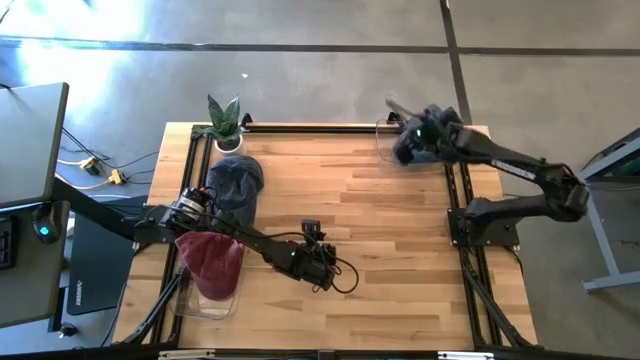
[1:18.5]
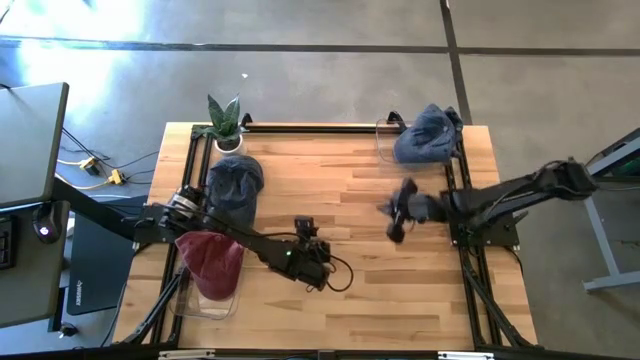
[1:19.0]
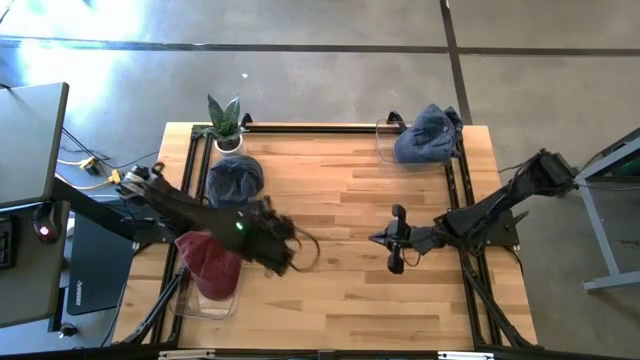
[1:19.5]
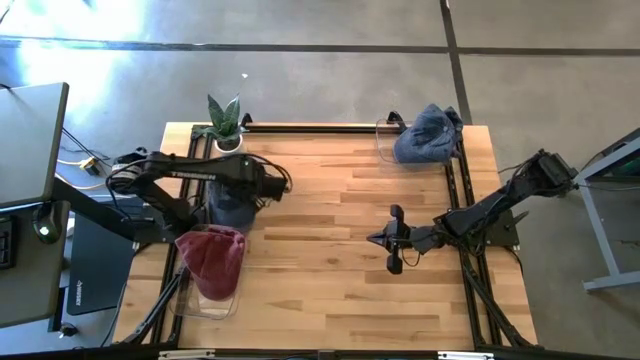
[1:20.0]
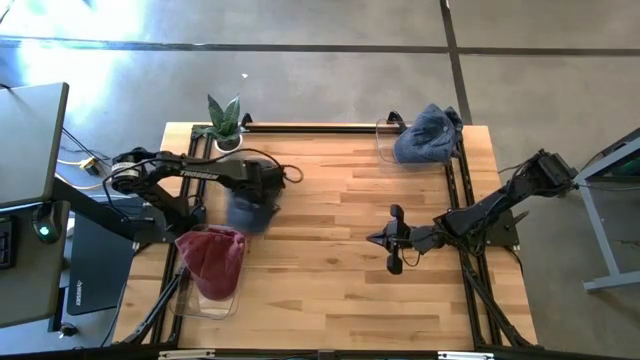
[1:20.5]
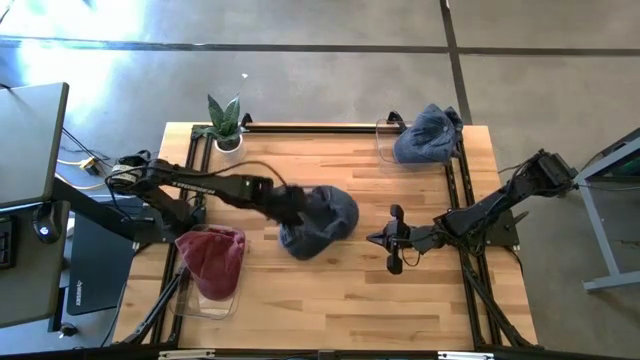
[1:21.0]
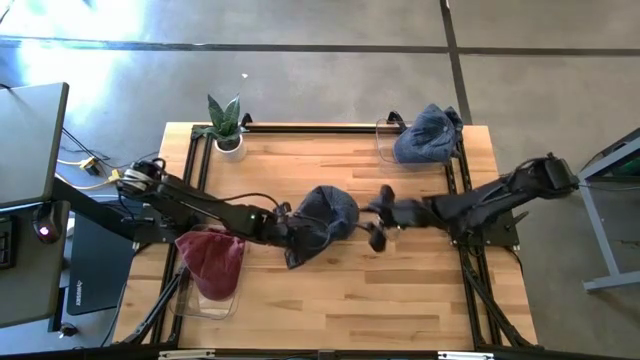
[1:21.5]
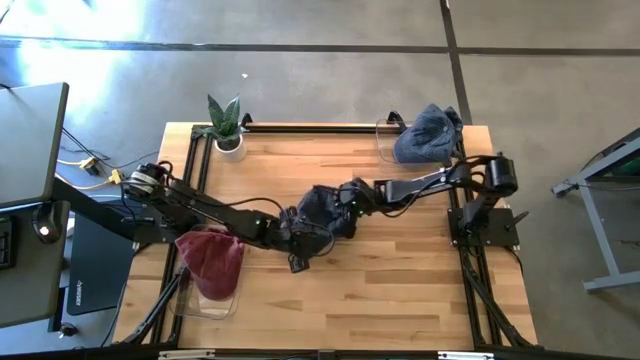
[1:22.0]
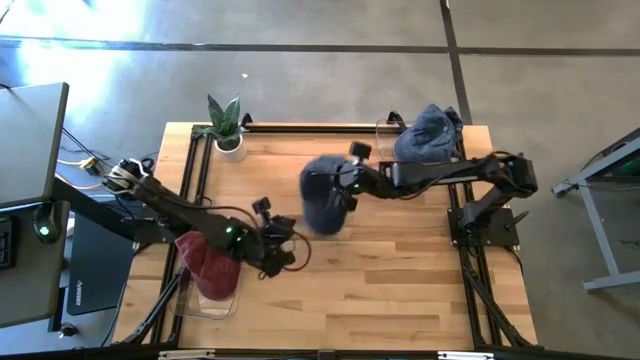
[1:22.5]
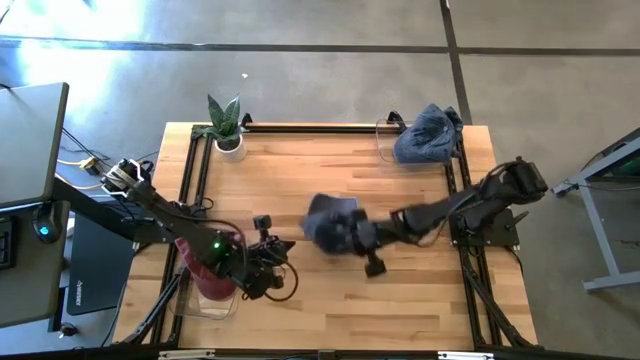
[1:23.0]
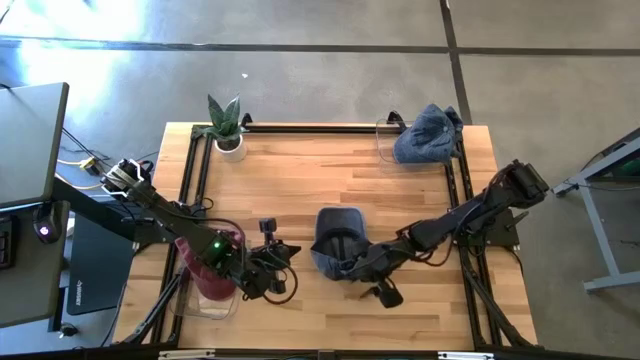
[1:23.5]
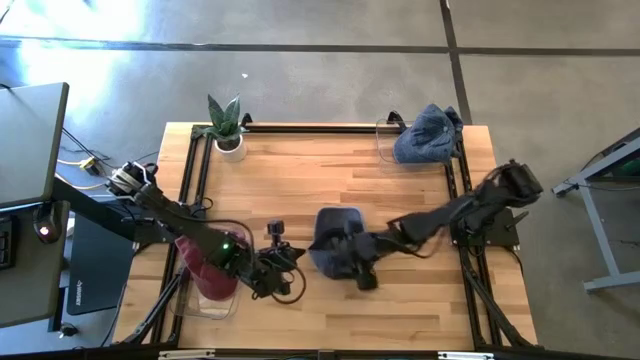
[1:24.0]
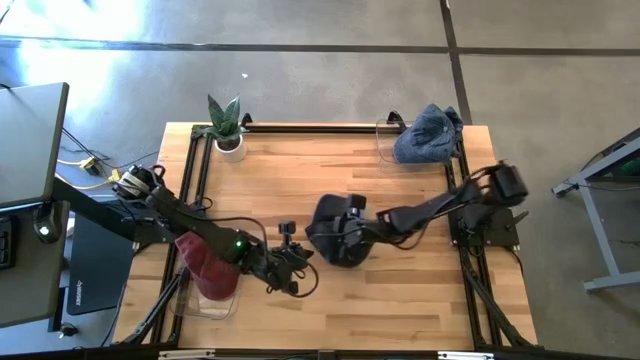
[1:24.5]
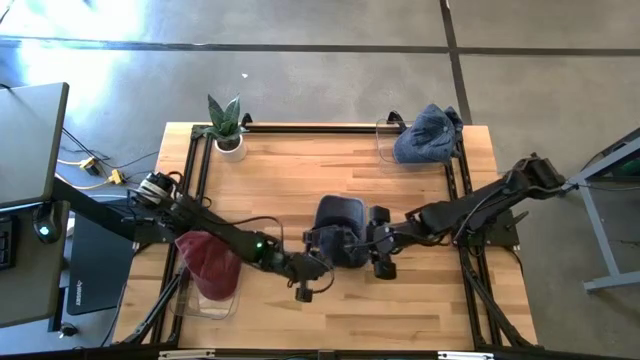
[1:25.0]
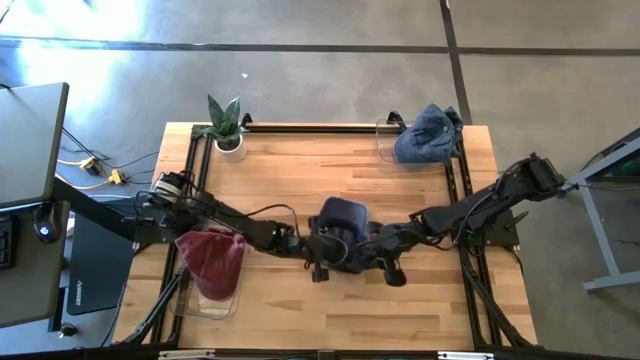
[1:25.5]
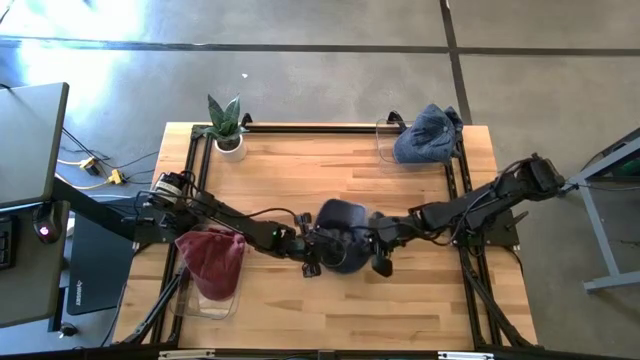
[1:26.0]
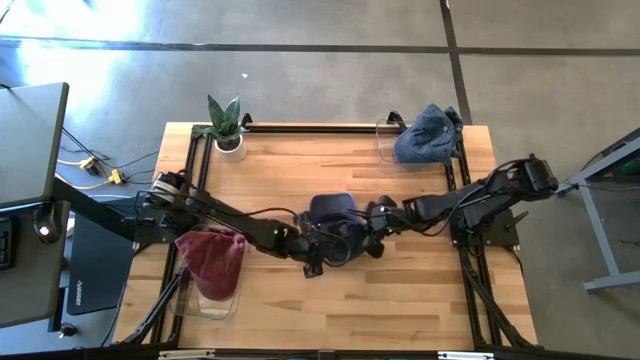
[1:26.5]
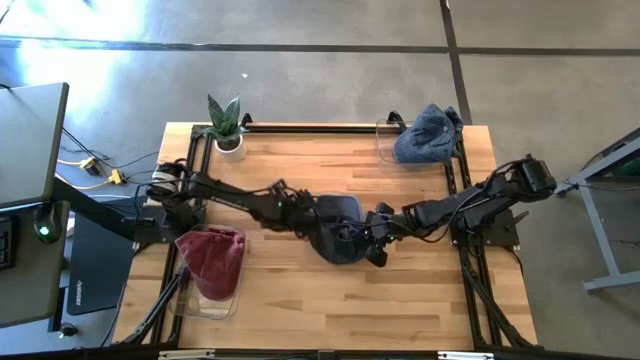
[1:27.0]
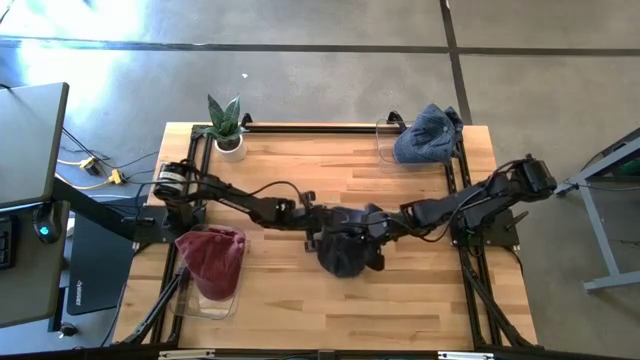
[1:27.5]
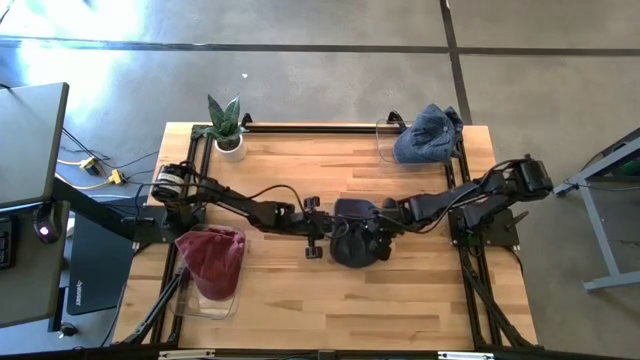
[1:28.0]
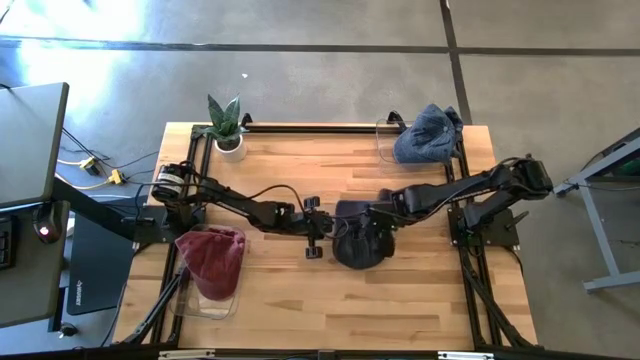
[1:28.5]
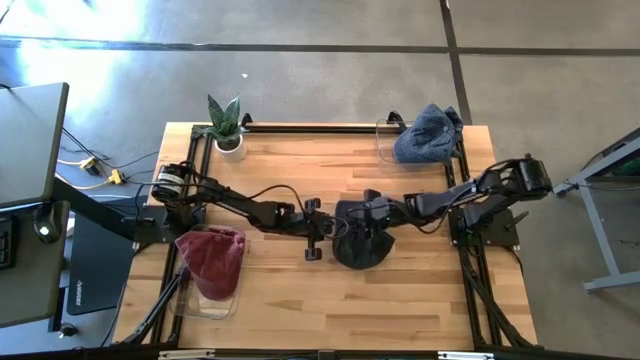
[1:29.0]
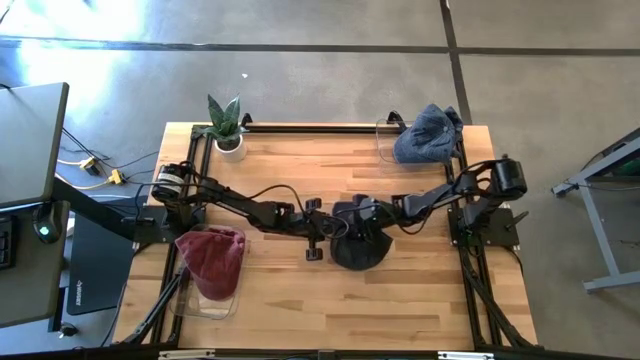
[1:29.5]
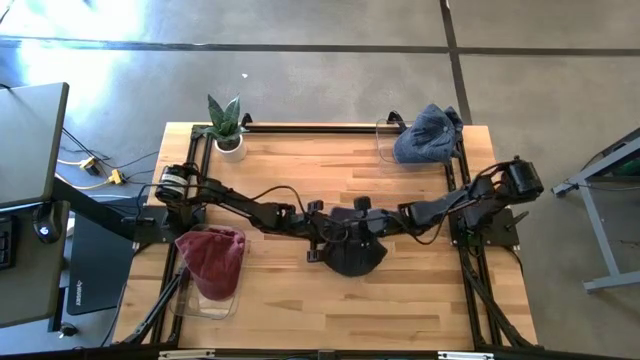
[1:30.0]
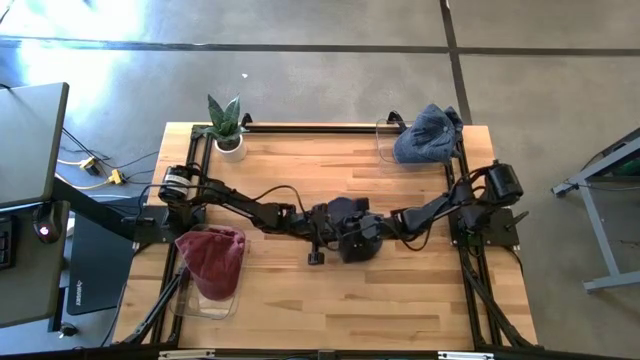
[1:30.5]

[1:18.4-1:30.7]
Task: Pick & Place hat
Put the dark blue cap into the top transparent bin

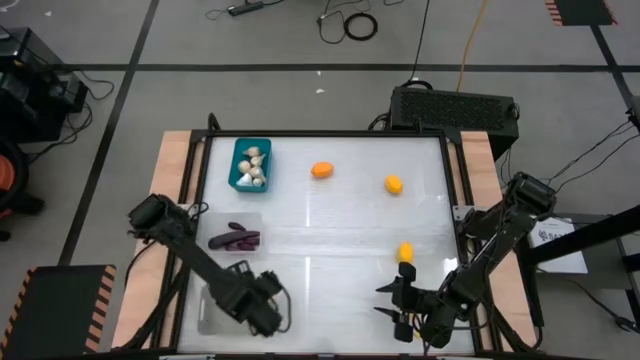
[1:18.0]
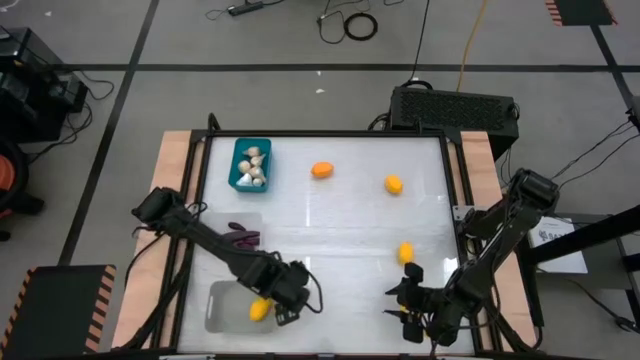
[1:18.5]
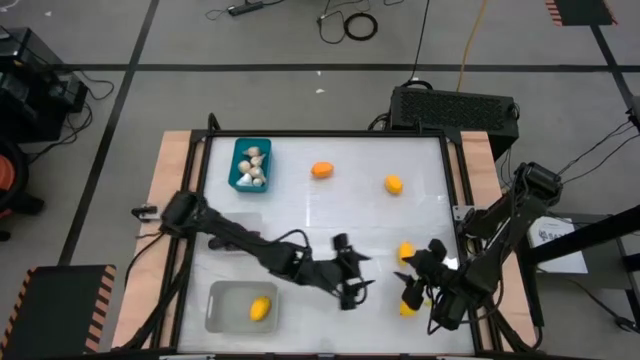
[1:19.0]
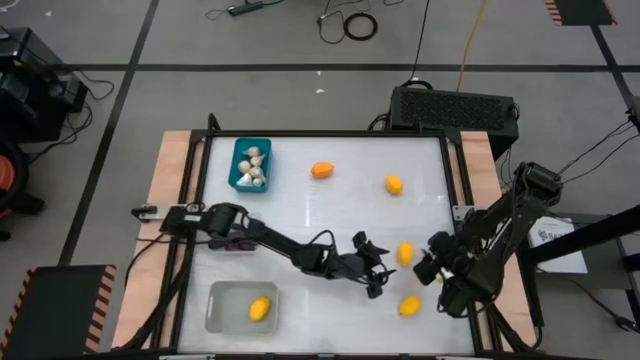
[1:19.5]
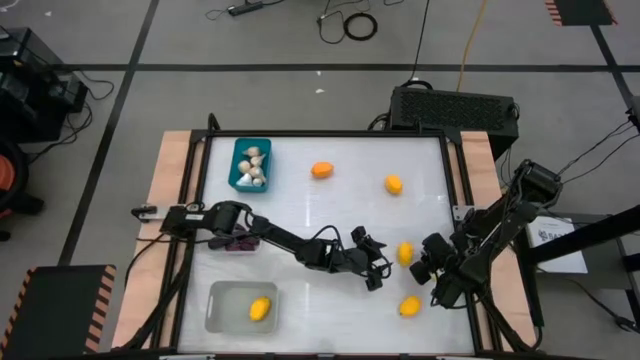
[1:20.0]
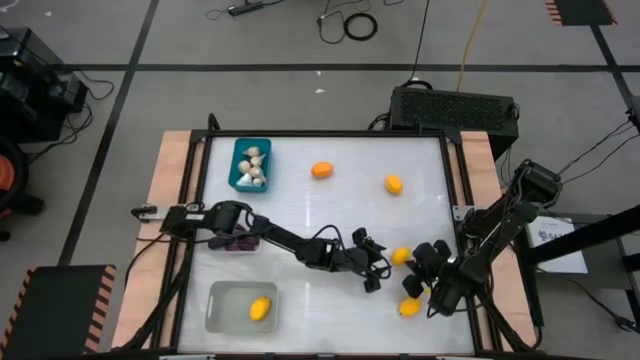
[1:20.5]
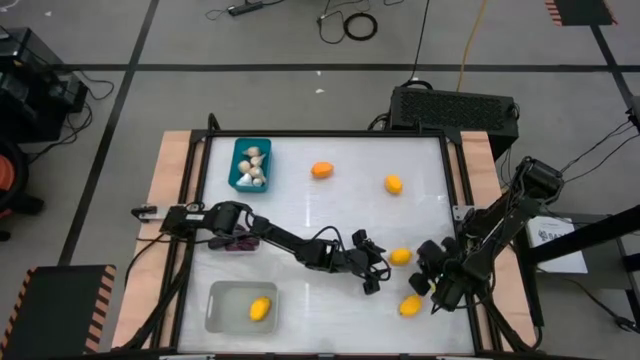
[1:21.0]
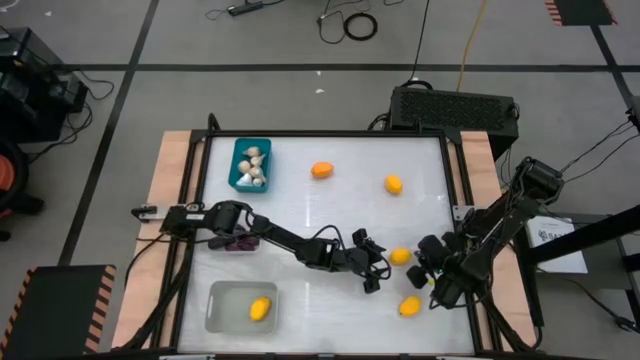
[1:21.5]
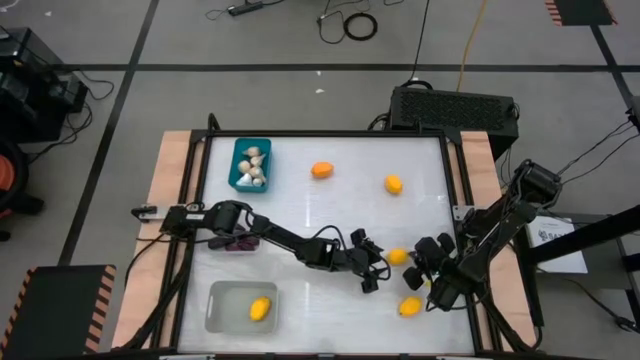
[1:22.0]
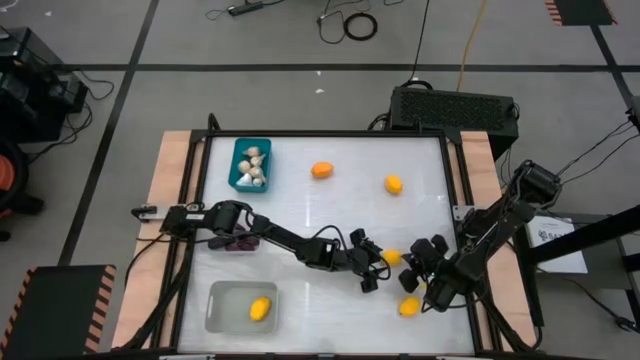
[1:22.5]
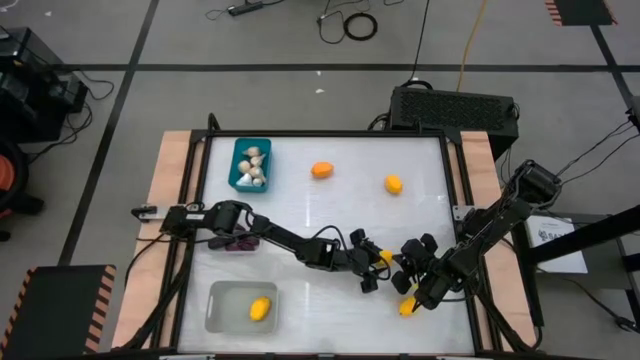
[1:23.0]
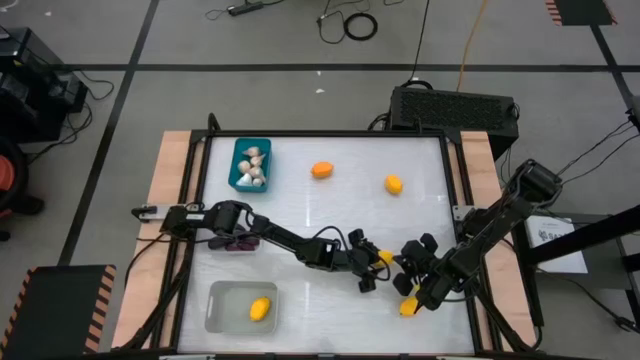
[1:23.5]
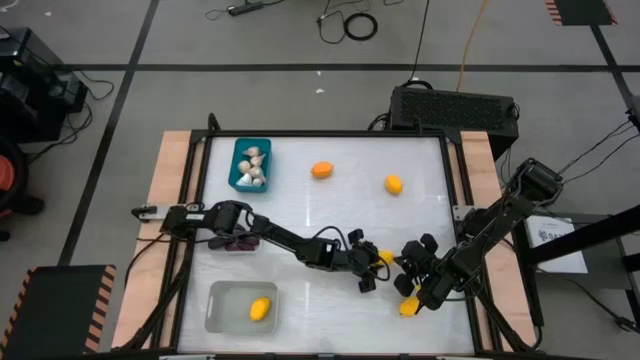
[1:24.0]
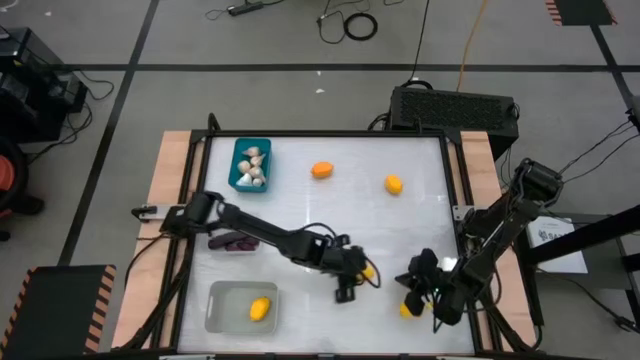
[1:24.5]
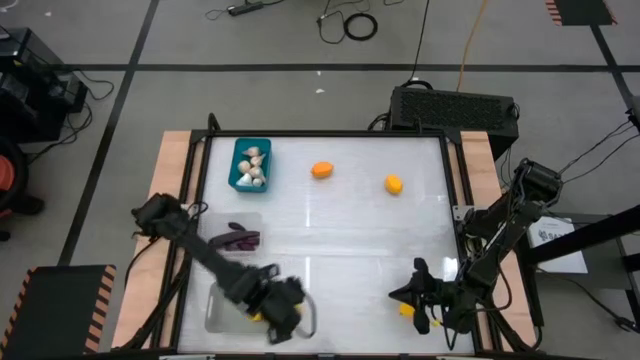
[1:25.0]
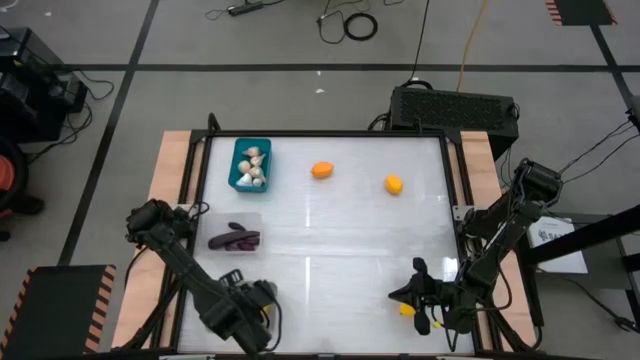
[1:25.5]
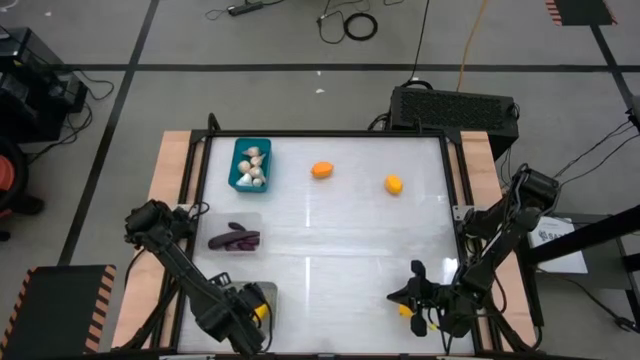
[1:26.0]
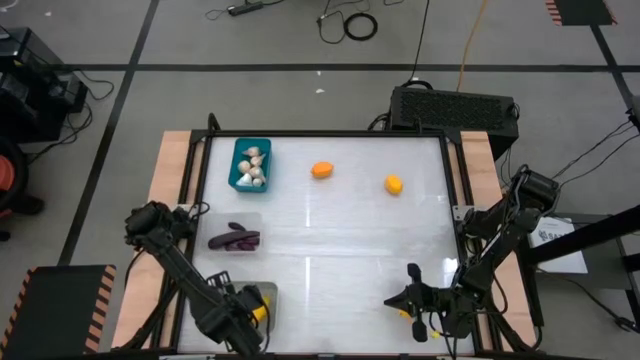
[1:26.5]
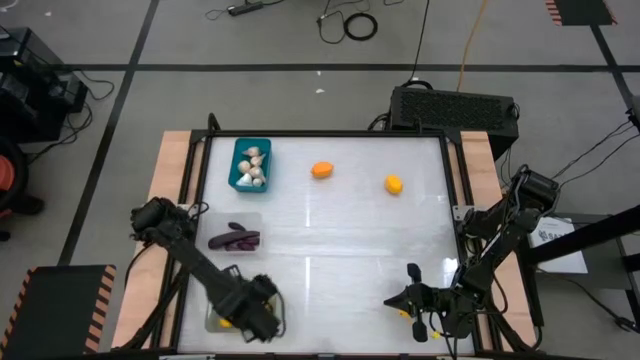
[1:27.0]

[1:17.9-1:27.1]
Task: Sort produce into baskets
Put the lemon into the gray bin
